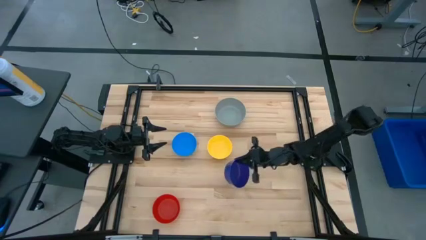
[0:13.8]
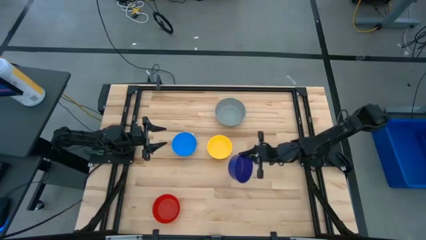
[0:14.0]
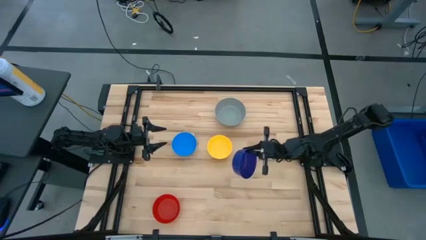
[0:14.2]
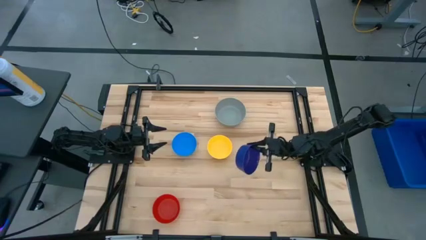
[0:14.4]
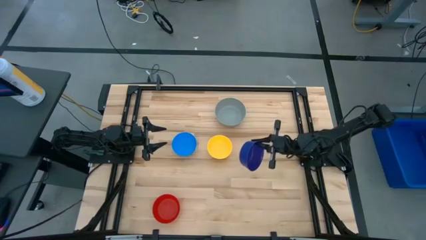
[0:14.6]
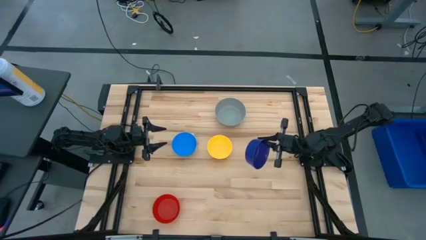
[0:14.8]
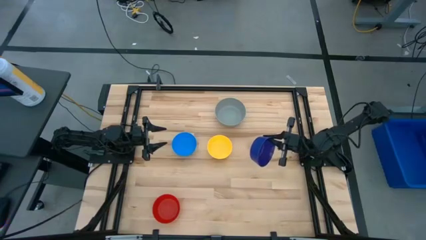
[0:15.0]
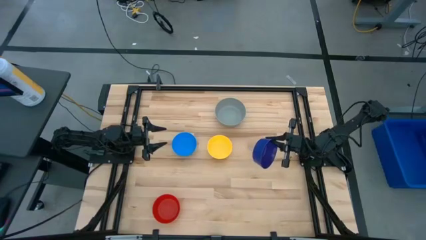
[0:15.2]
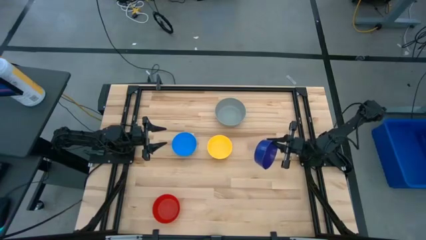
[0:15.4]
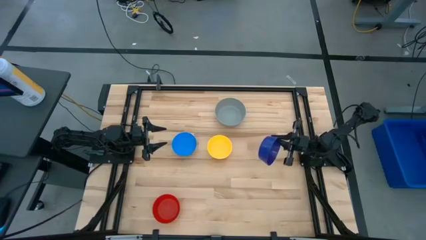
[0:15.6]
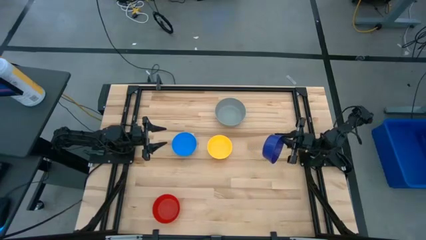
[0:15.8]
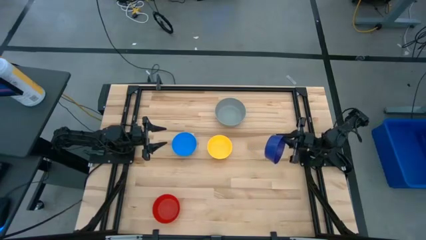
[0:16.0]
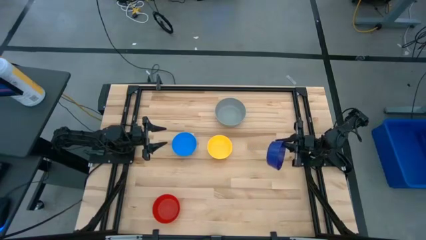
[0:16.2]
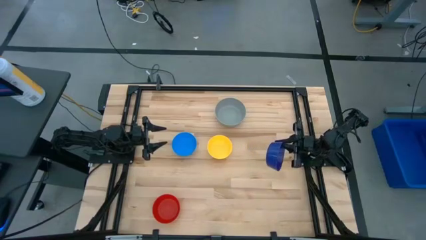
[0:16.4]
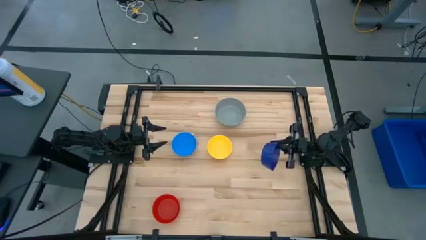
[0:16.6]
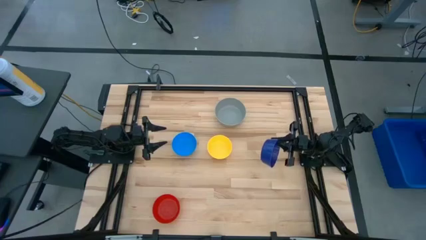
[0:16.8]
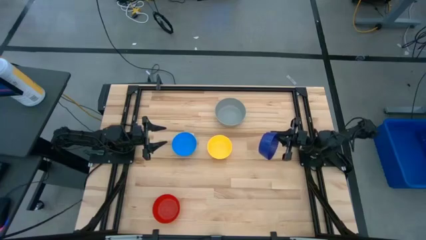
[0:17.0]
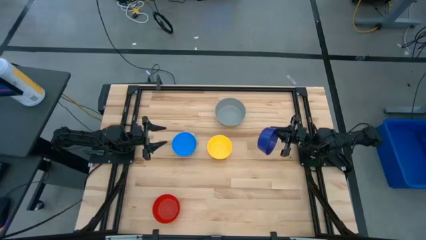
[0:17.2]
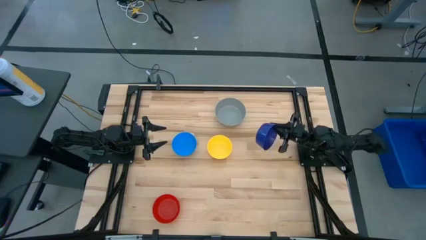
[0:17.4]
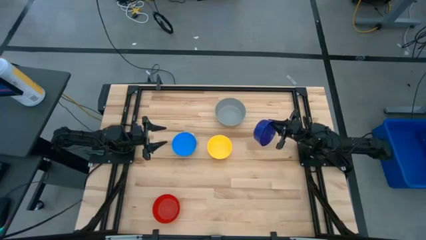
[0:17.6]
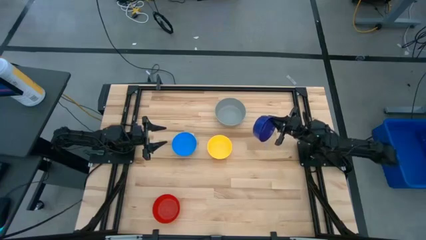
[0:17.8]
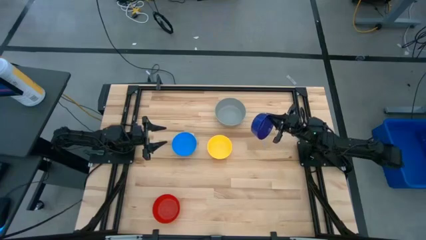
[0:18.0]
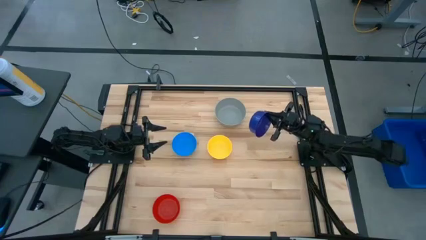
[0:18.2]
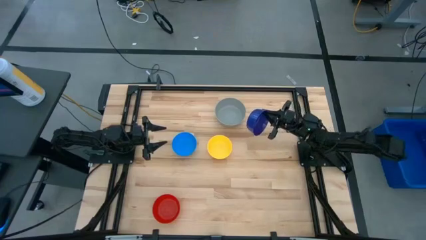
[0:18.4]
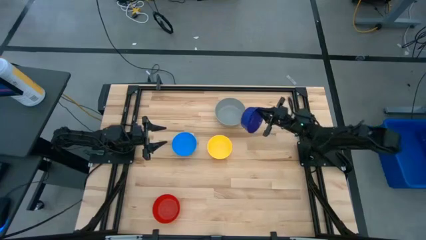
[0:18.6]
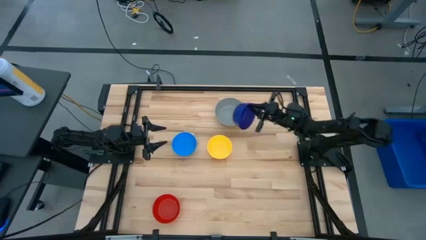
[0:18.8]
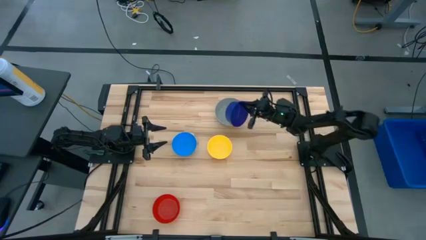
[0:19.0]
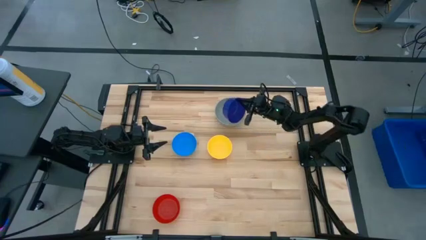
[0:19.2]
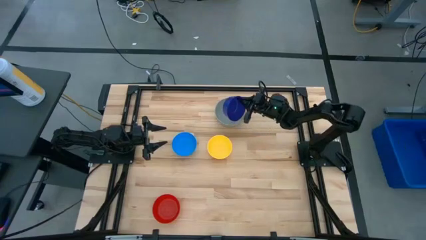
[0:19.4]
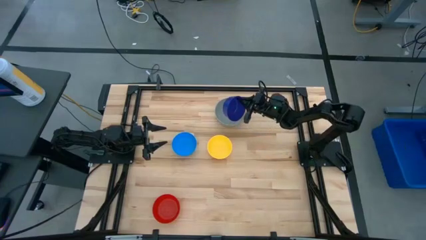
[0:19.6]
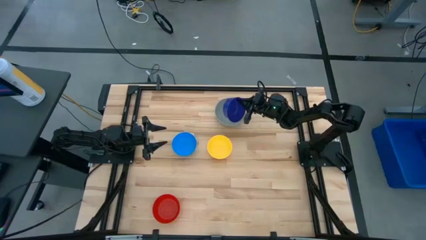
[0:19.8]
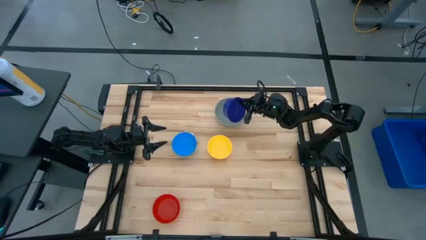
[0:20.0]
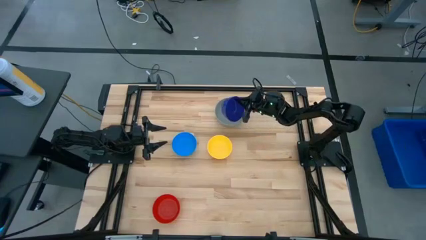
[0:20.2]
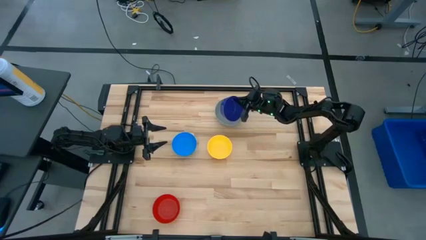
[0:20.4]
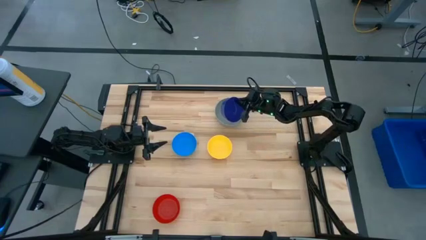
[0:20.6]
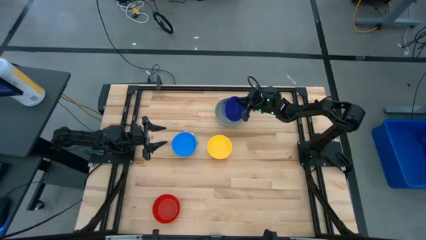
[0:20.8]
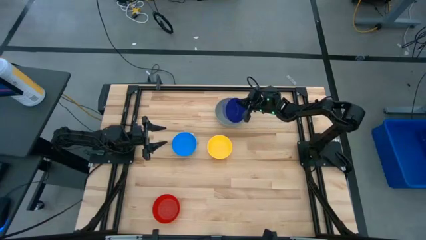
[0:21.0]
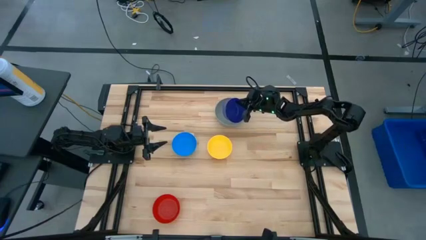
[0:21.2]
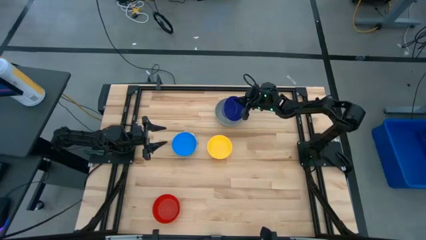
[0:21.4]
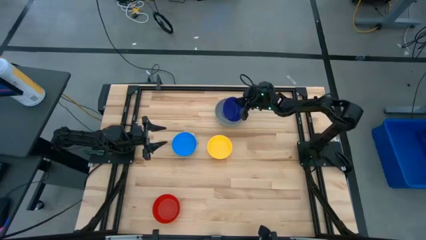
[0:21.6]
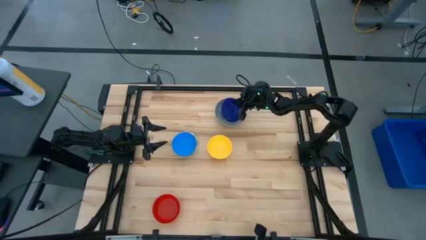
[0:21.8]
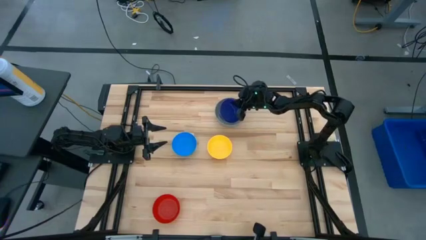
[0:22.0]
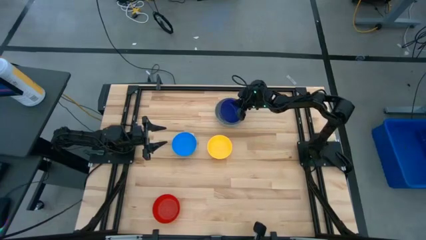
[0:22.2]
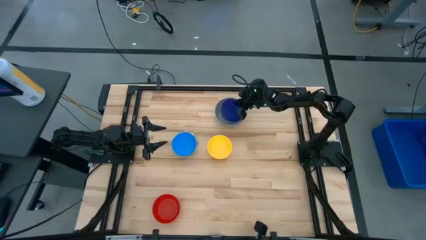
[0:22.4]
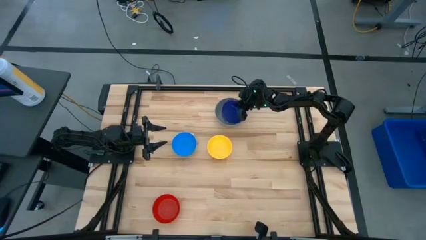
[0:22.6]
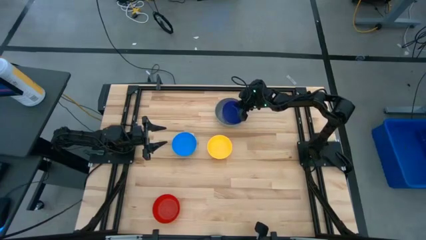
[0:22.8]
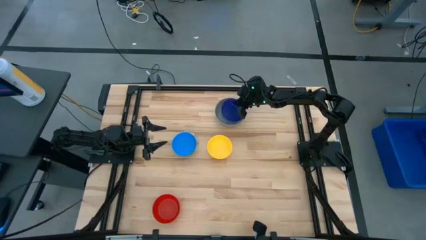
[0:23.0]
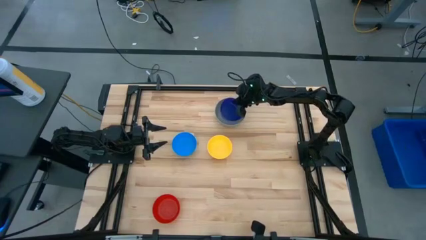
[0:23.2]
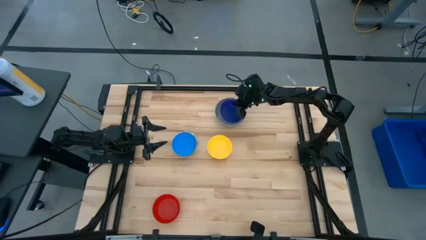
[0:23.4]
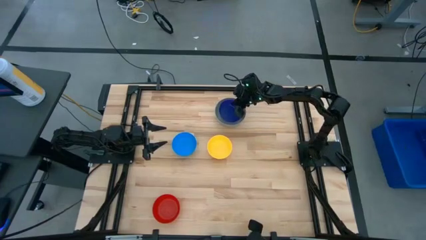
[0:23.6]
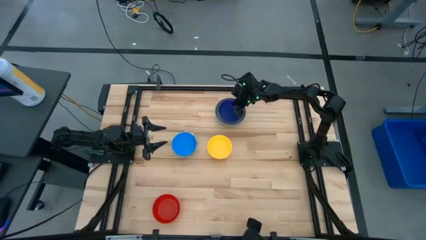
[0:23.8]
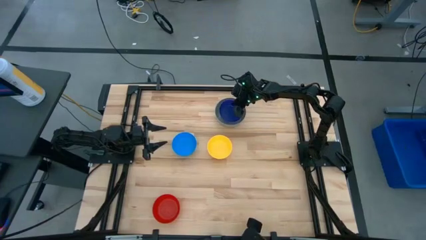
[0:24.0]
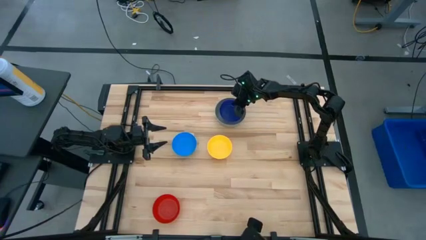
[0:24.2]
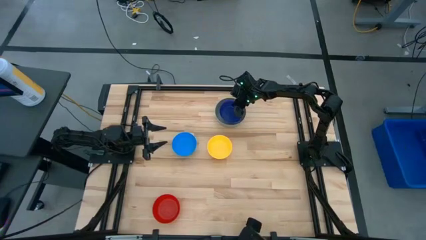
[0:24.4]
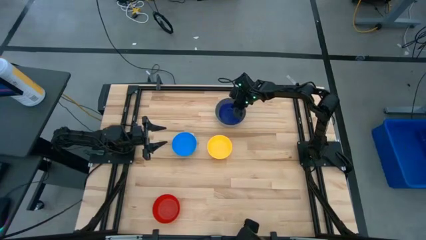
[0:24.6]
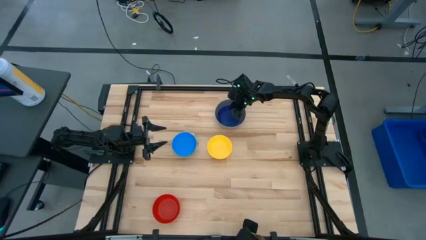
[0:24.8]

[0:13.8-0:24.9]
Stack the dark blue bowl on the gray bowl
